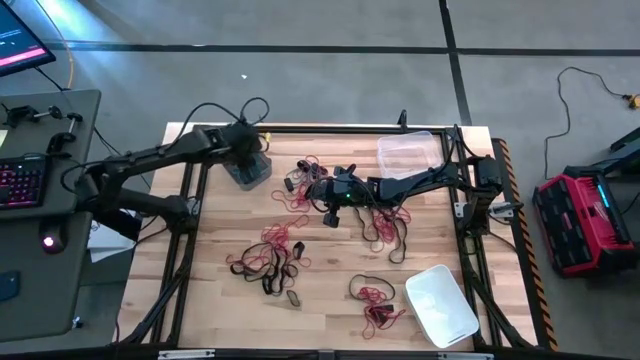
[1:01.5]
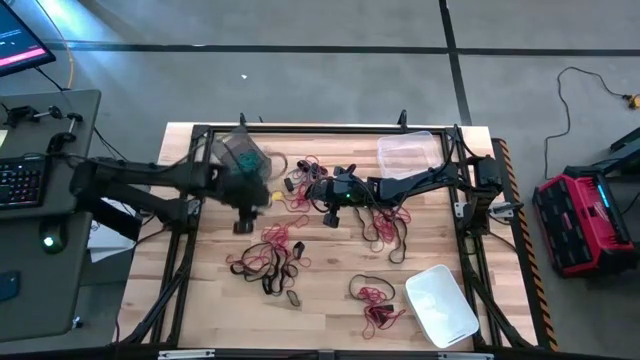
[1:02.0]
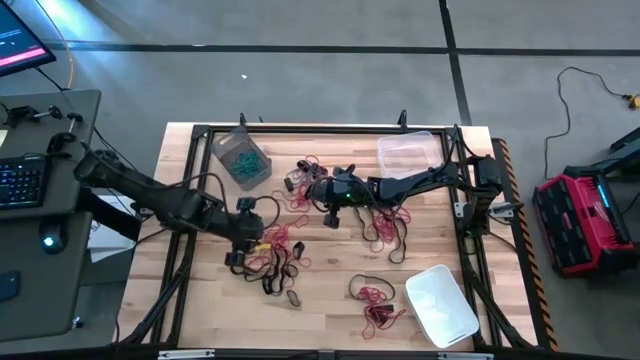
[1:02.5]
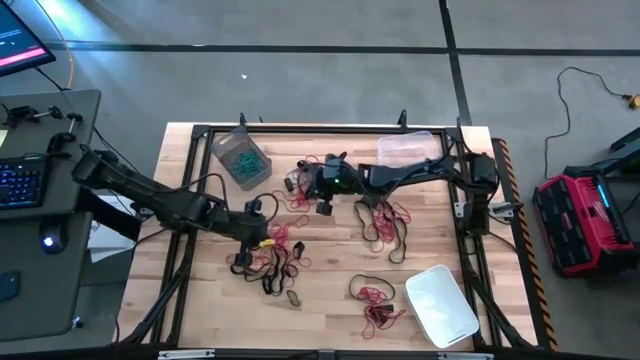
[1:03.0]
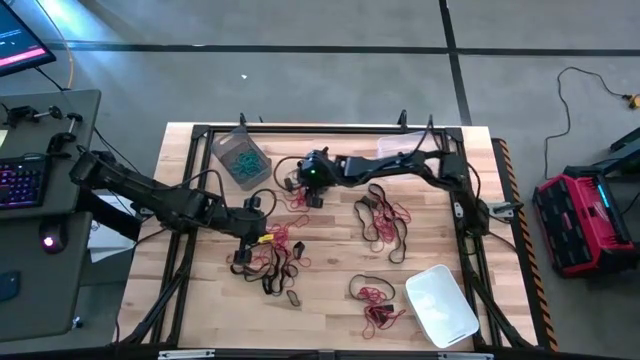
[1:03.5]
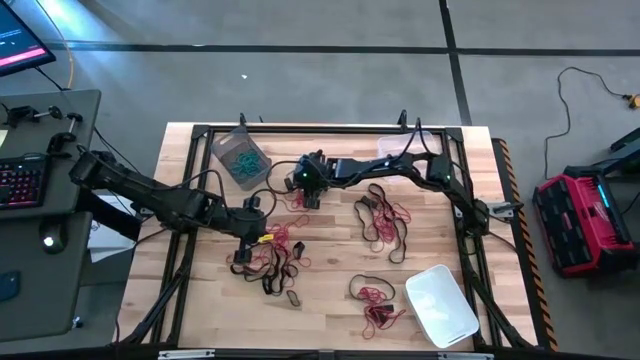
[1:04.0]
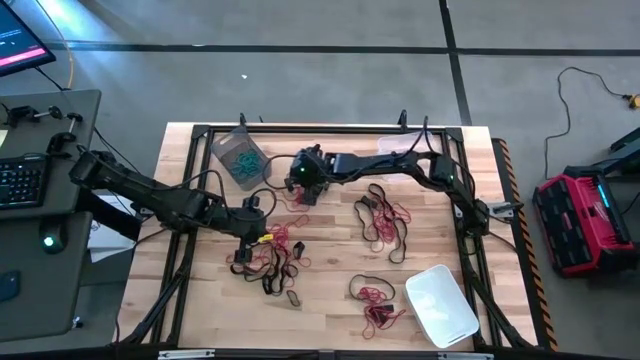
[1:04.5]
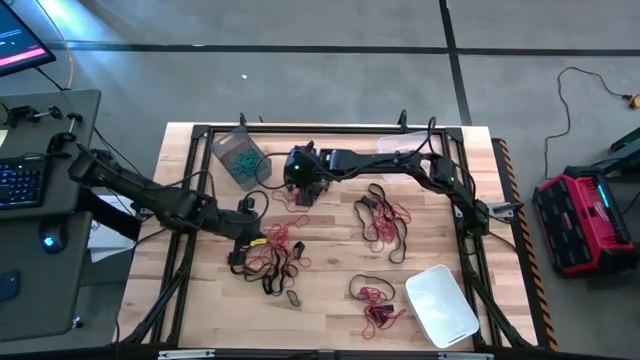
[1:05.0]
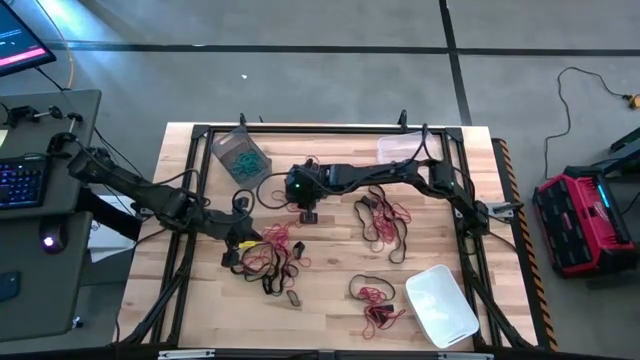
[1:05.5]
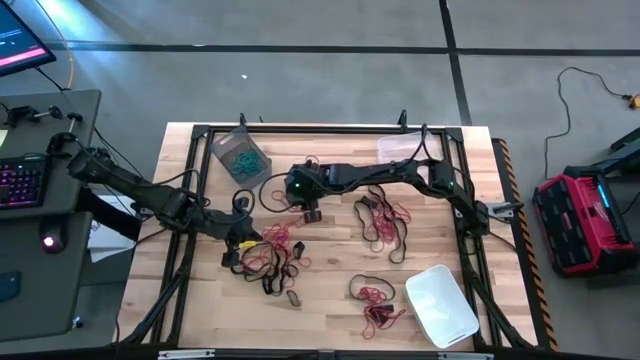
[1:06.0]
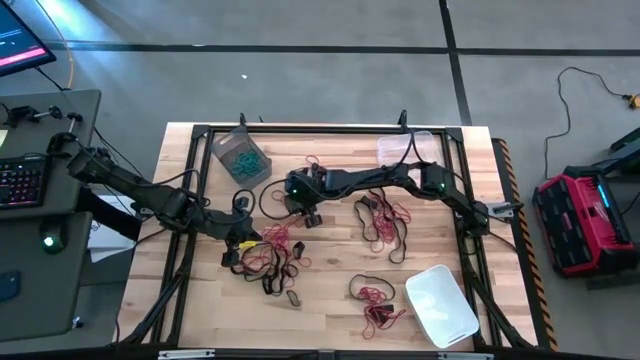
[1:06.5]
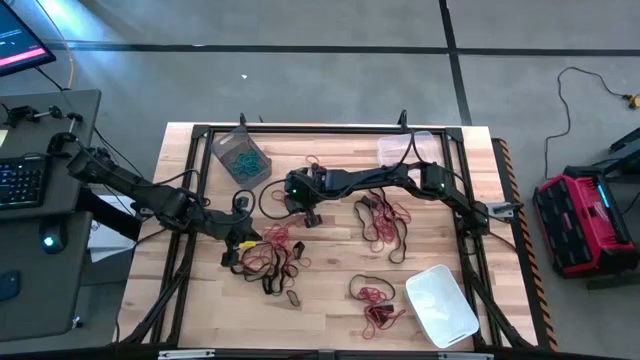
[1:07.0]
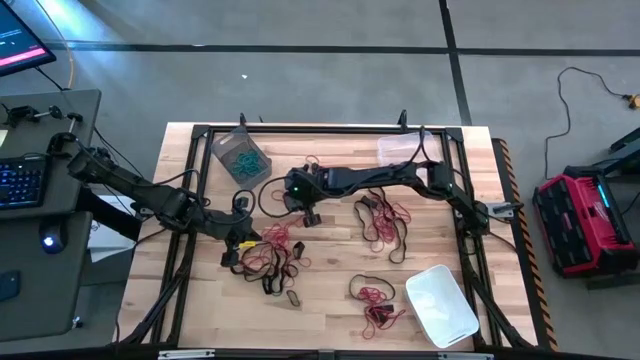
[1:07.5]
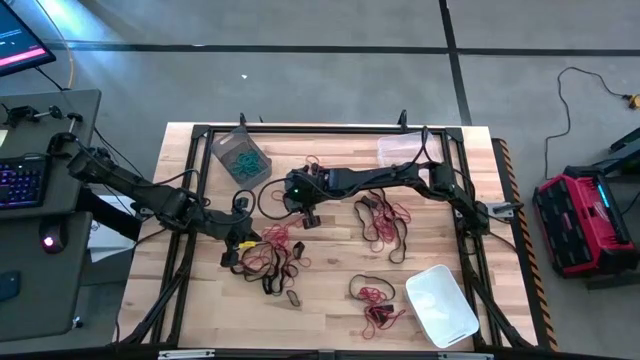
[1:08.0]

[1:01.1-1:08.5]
Task: Sort rubber bands into baskets
Put the blue rubber band into the black bin

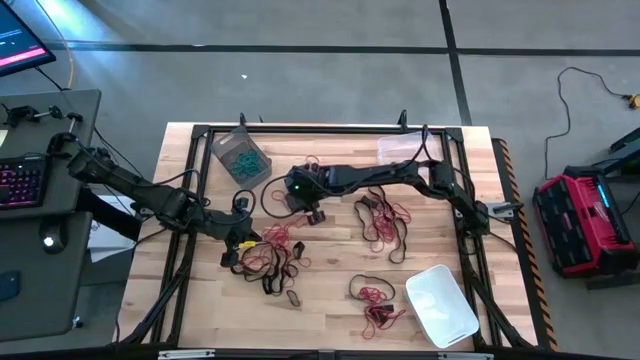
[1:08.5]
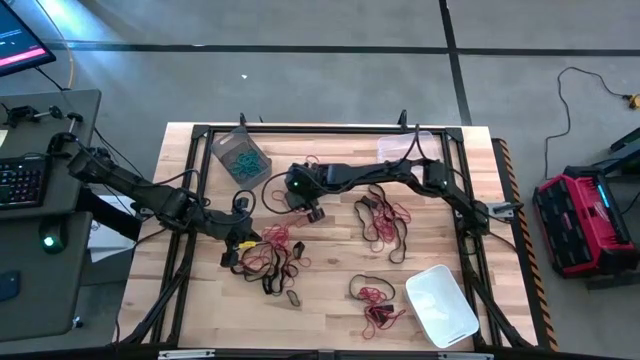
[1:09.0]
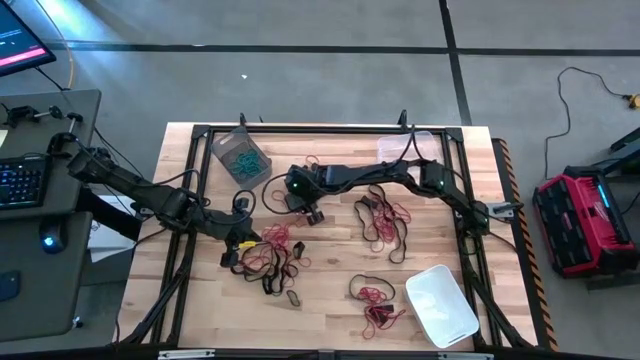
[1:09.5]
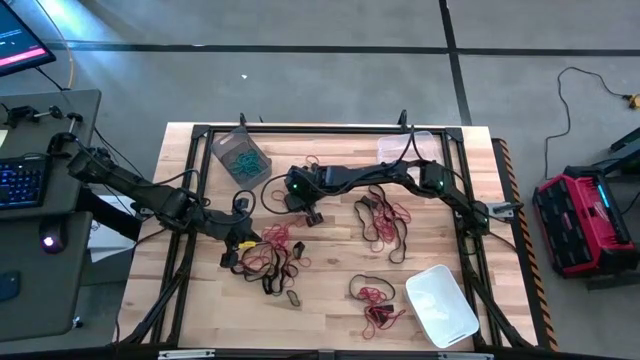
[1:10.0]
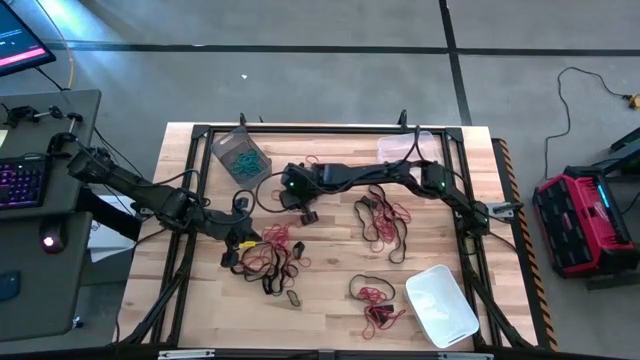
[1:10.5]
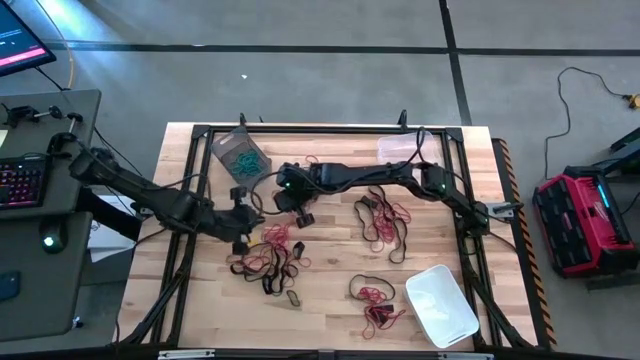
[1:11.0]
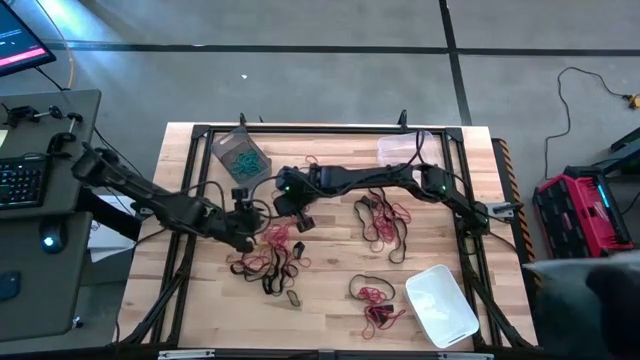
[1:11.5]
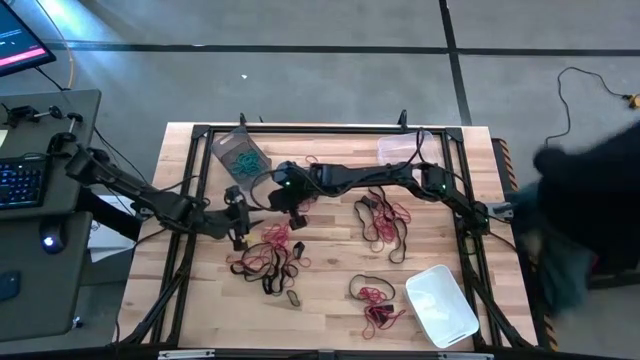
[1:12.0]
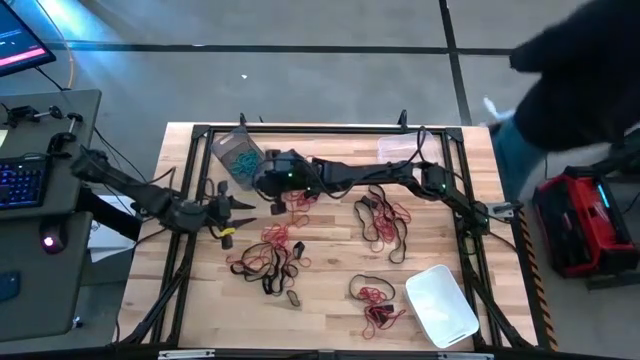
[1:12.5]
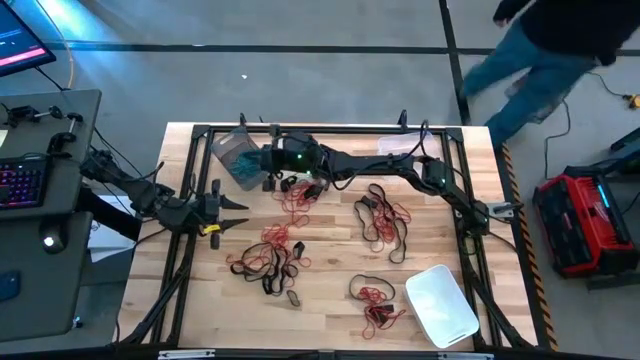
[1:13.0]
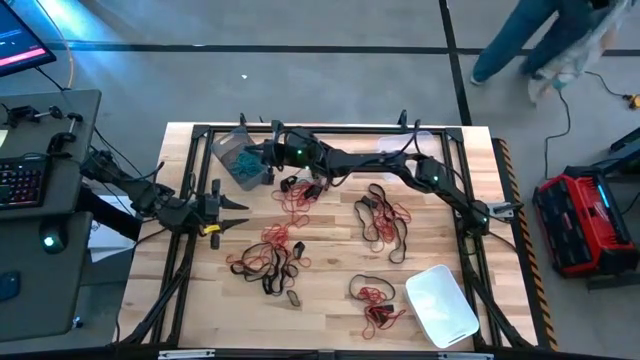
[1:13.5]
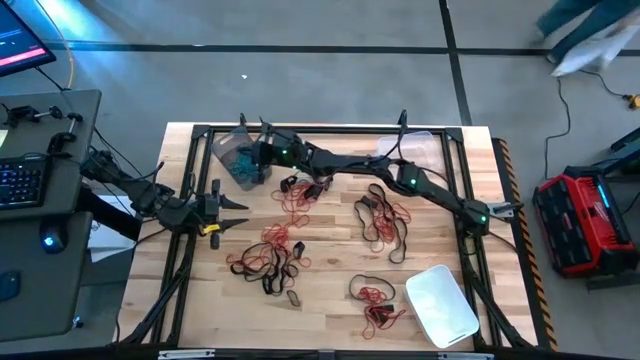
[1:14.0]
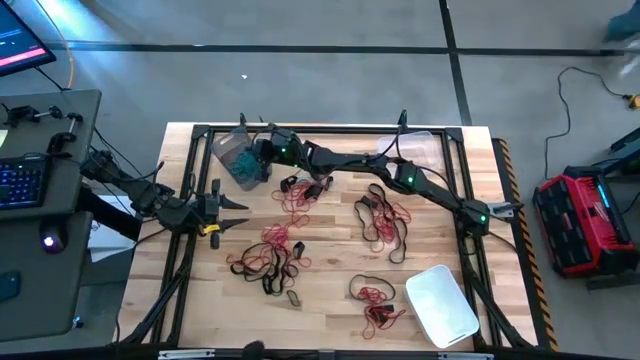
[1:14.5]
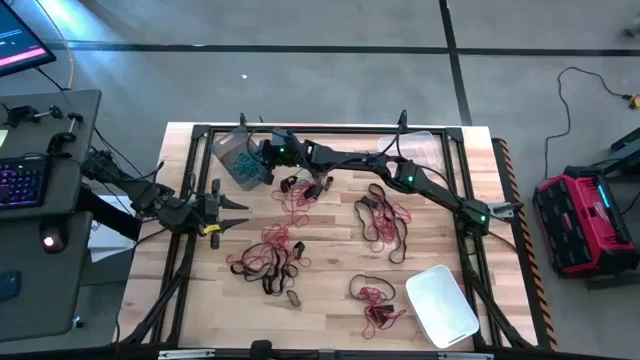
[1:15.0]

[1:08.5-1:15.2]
Put the blue rubber band into the black bin

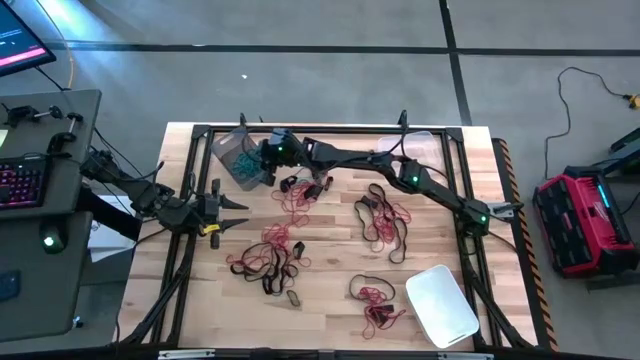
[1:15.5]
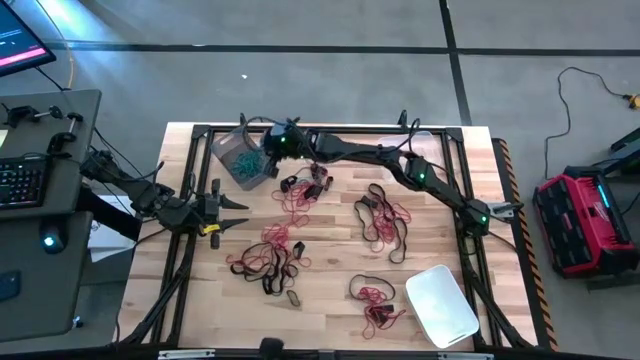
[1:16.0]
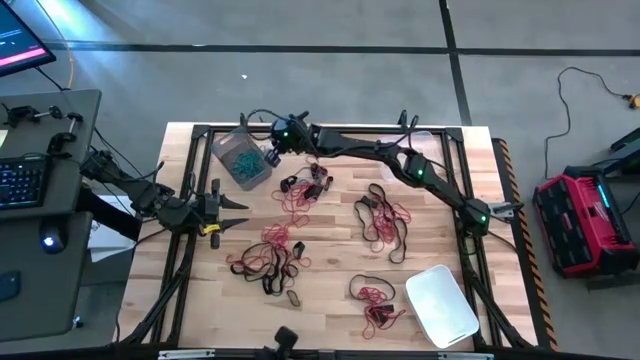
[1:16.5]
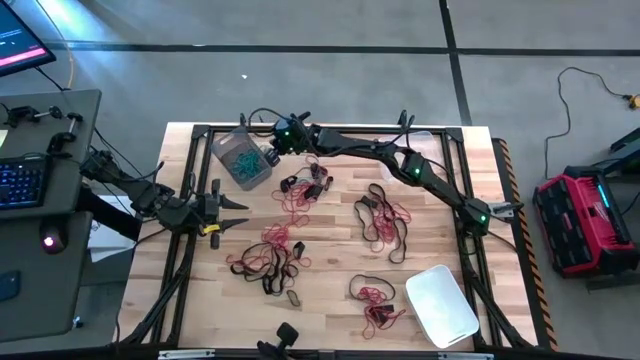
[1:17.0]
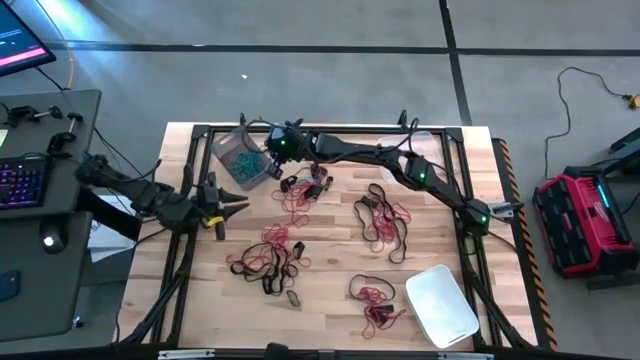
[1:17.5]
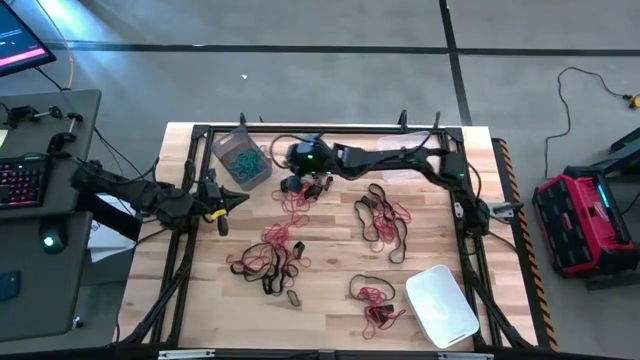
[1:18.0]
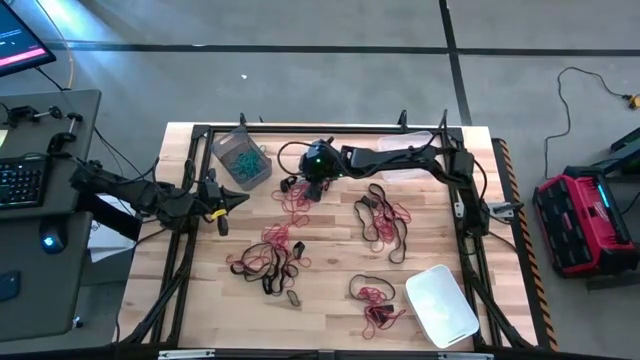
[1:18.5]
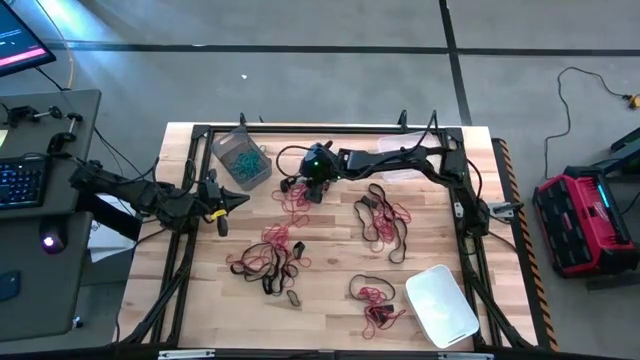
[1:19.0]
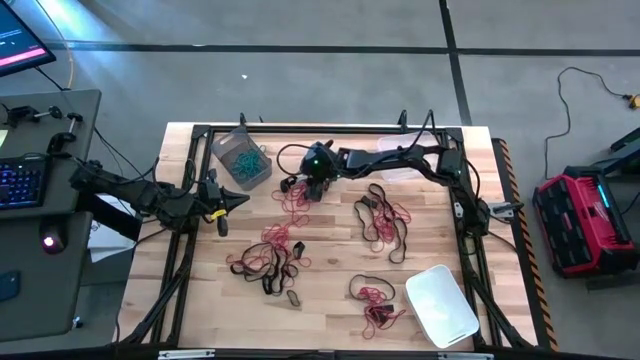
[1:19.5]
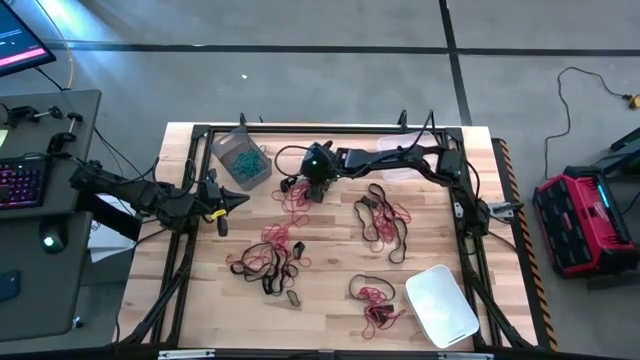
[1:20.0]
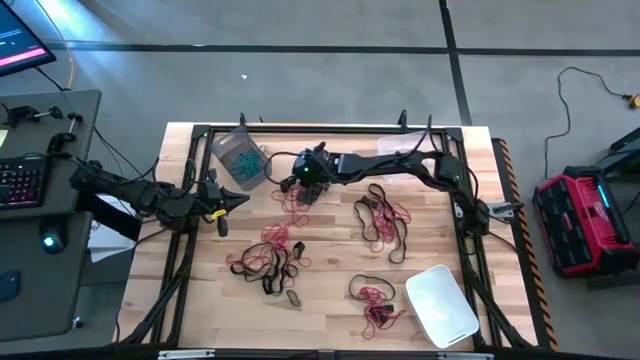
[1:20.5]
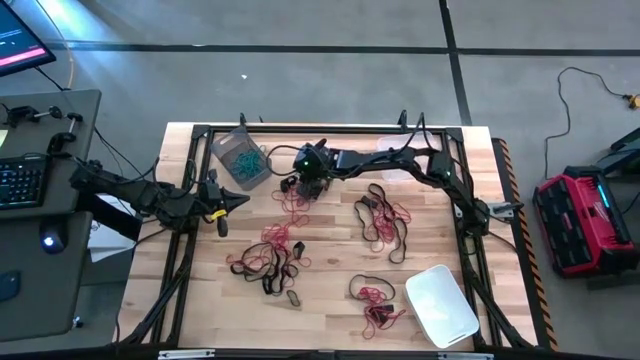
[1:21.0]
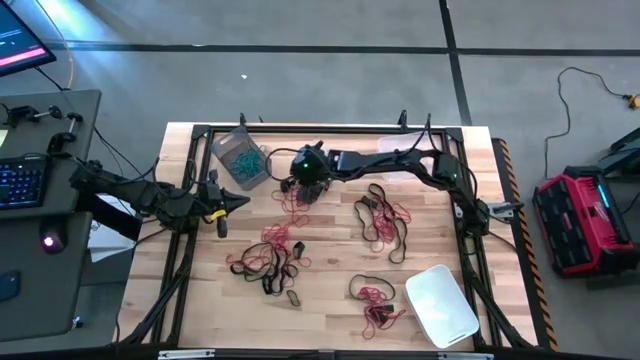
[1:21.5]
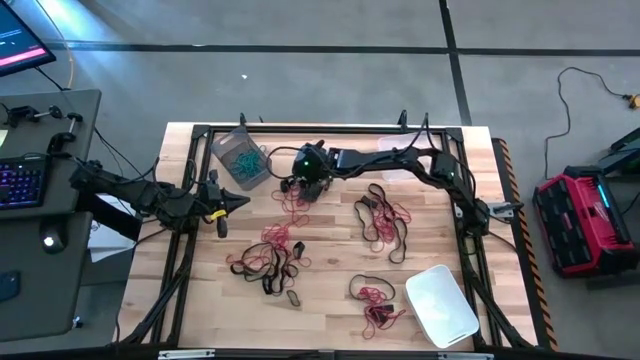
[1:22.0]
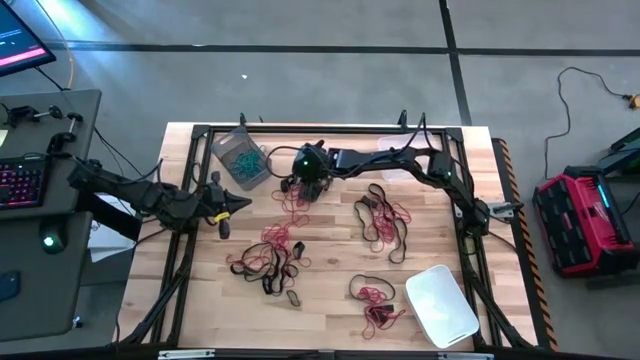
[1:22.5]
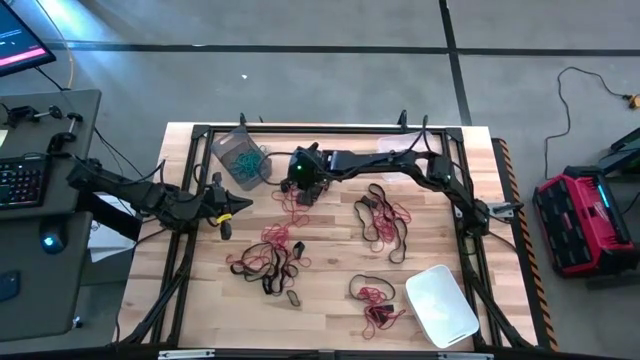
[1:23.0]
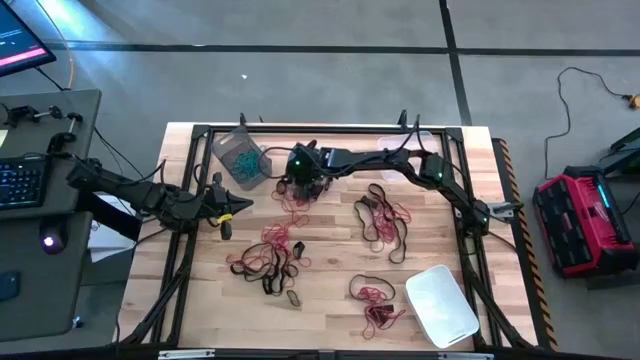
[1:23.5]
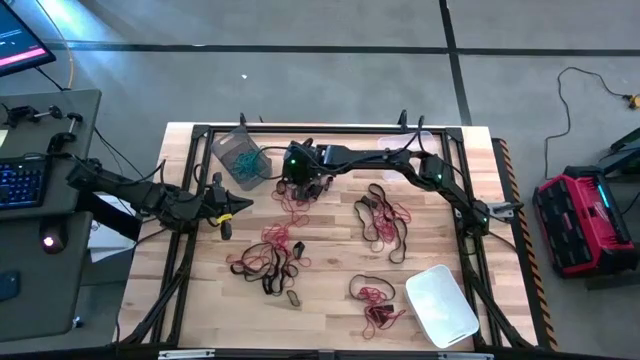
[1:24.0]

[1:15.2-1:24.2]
Put the blue rubber band into the black bin
